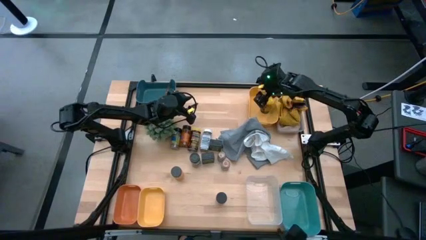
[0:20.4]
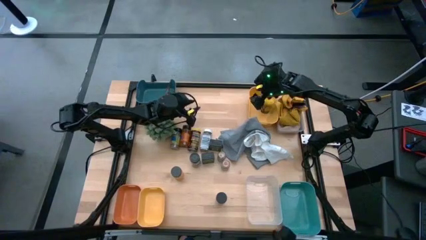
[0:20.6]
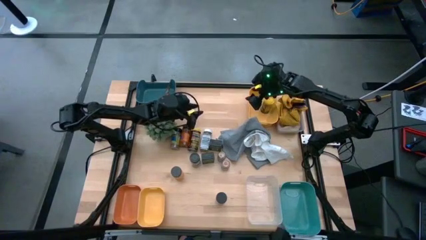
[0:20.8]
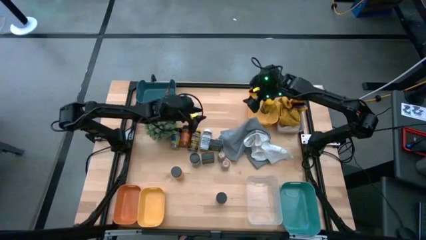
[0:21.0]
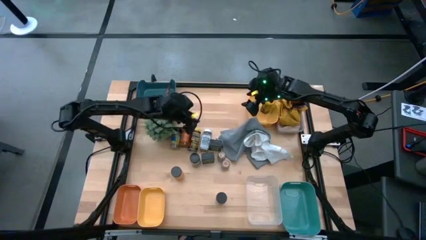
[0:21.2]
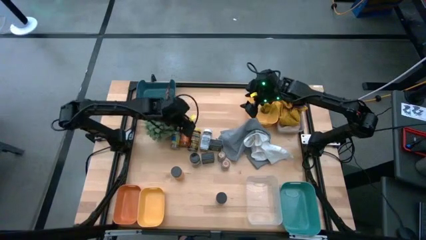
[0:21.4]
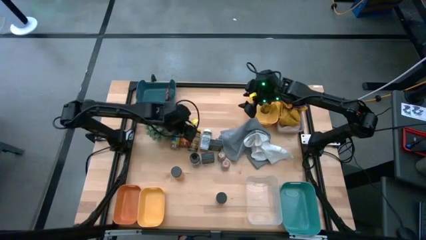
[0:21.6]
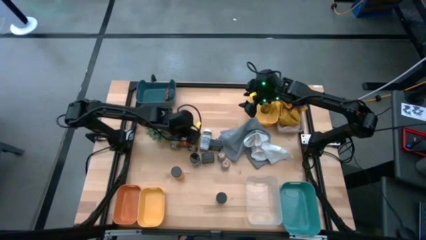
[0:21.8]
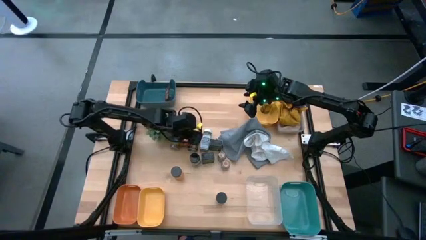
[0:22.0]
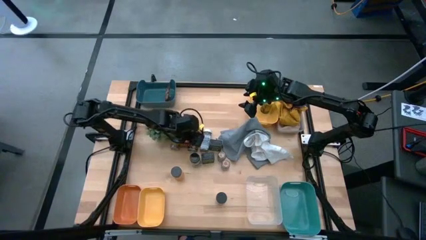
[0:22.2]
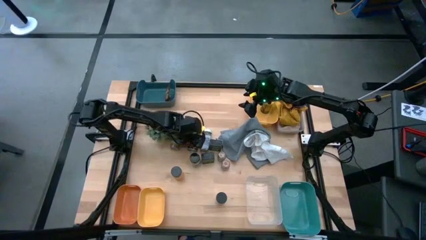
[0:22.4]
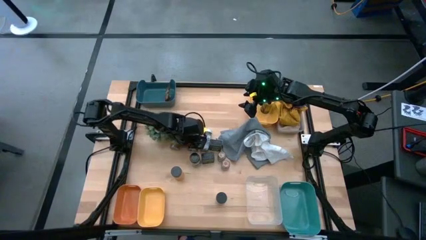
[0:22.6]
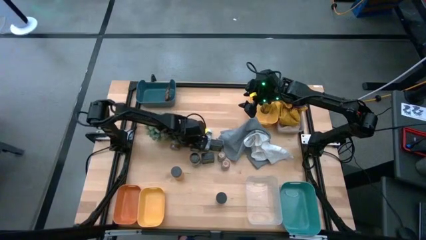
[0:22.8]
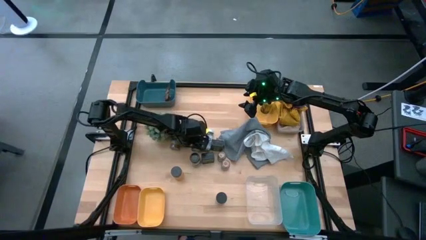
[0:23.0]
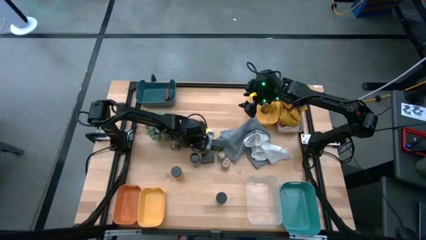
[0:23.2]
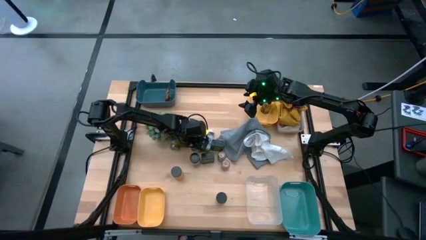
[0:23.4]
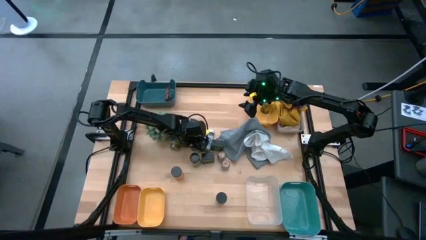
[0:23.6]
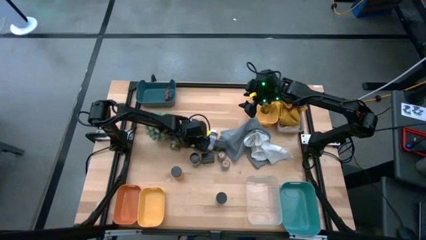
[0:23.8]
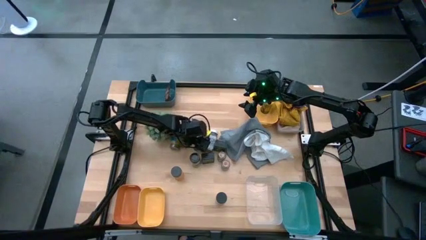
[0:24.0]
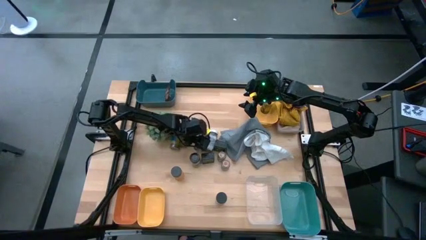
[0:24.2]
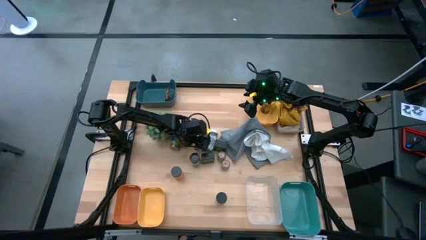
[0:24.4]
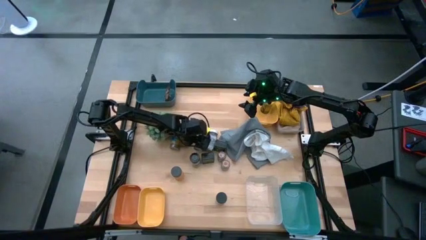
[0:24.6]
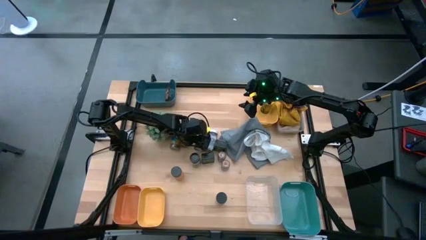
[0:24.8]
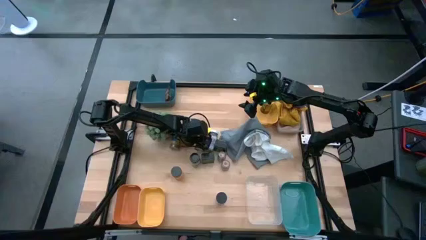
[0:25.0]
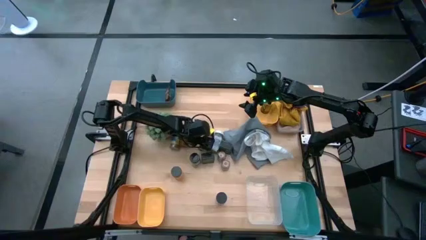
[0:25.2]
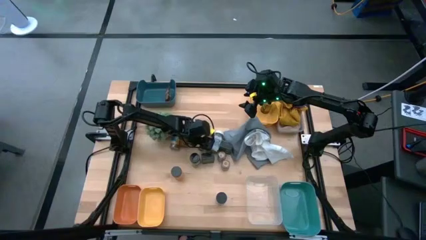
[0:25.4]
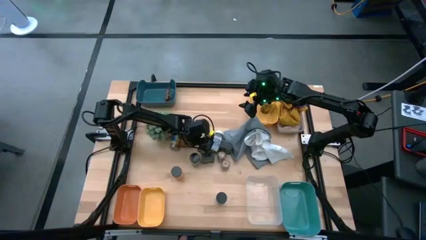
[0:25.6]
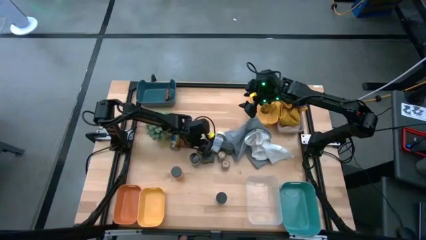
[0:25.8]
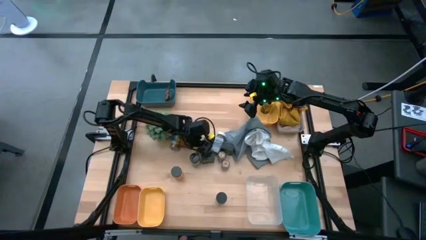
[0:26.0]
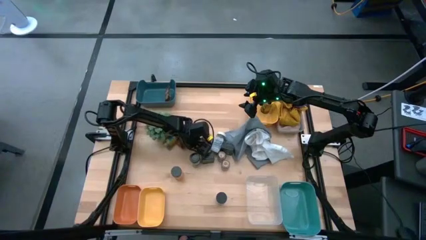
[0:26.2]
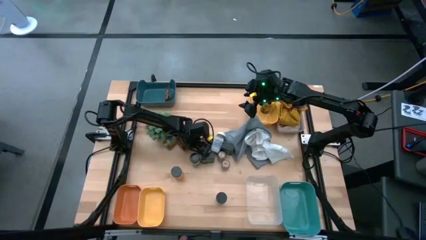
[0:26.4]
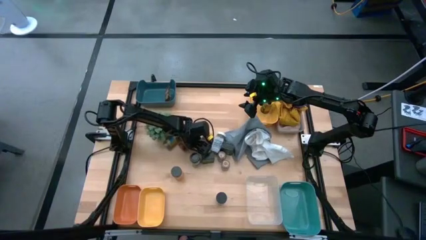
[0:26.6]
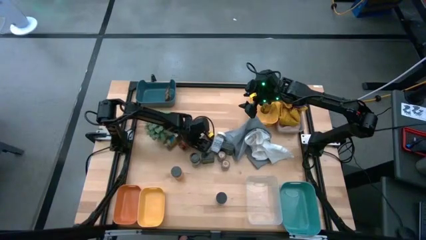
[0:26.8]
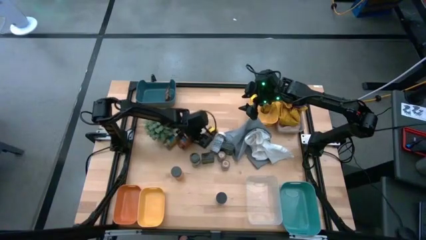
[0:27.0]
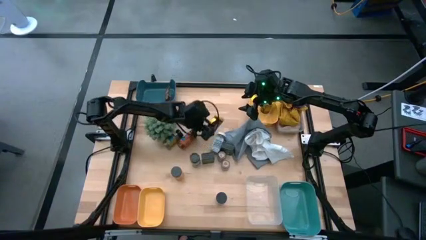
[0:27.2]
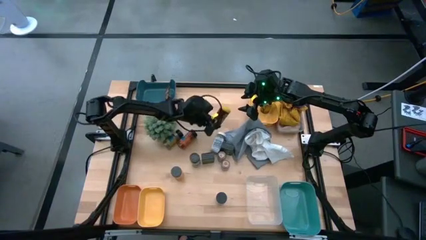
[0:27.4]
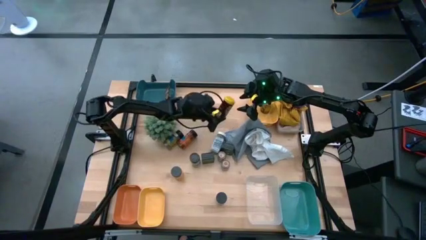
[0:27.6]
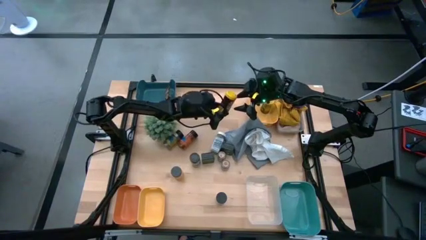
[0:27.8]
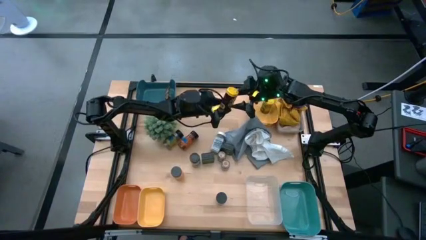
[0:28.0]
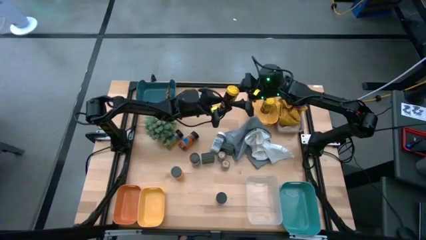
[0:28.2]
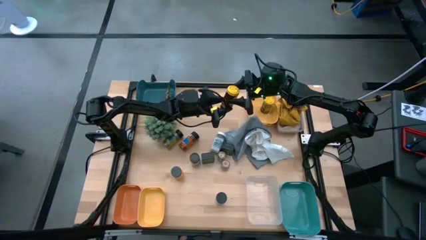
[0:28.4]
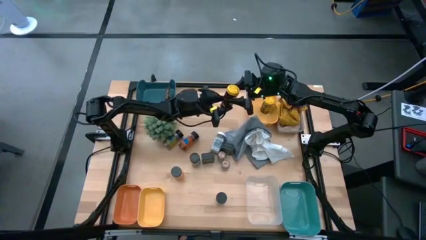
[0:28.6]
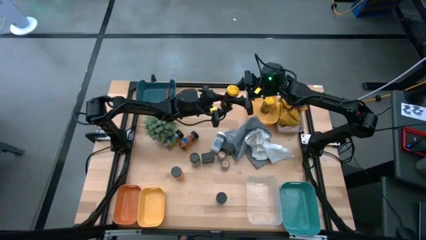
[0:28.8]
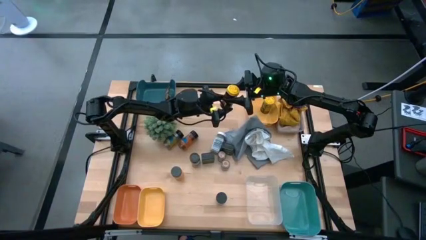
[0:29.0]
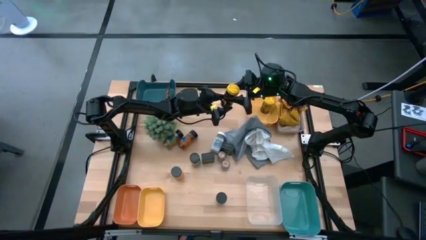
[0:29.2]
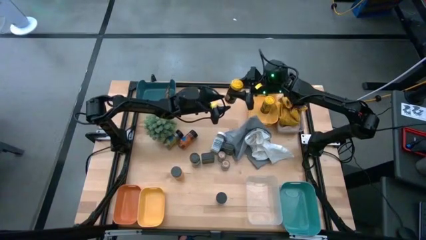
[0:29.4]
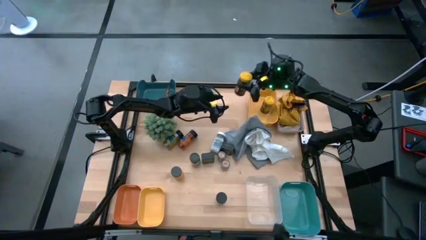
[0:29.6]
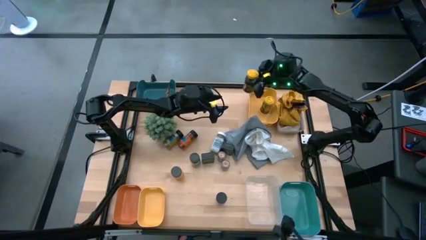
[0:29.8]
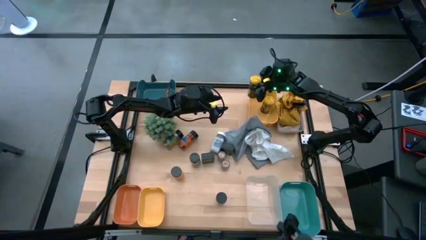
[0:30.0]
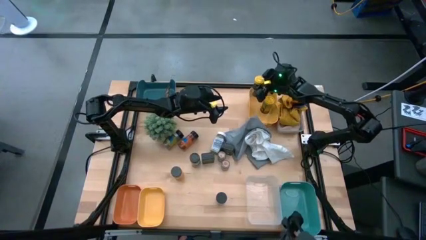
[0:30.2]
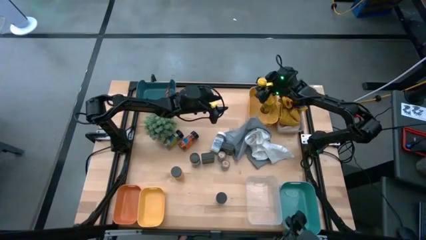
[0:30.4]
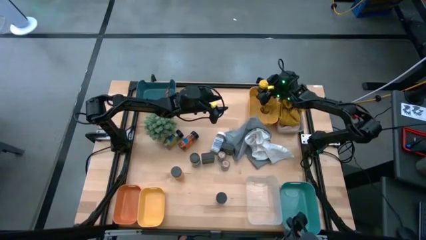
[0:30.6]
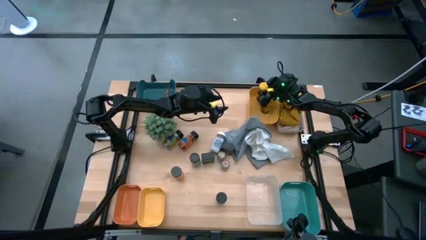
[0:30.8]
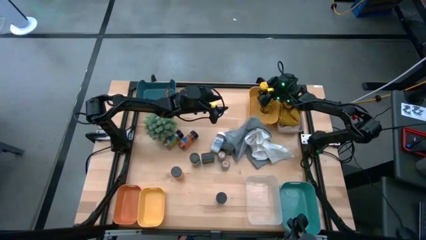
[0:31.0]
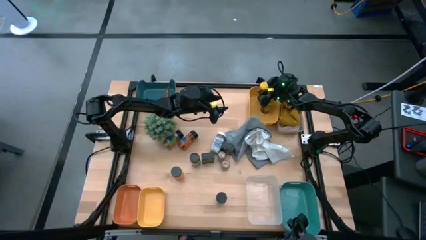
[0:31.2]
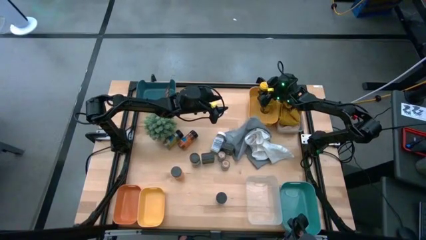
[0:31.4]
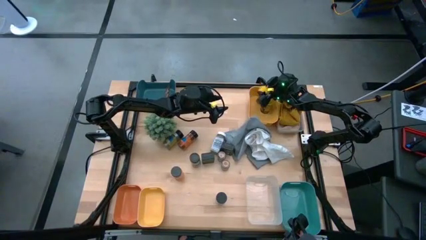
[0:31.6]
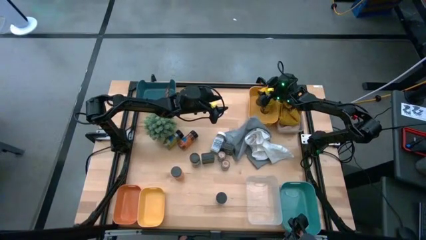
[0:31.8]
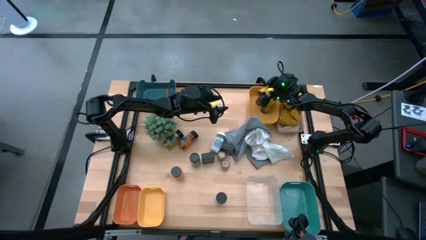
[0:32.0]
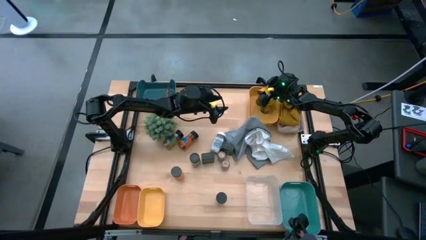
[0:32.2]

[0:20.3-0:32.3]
Task: Sort spices by type
Put the yellow seasoning bottle into the top yellow bin
